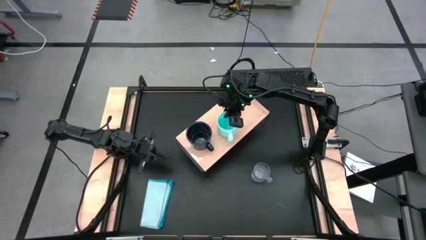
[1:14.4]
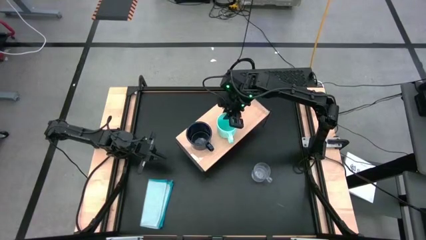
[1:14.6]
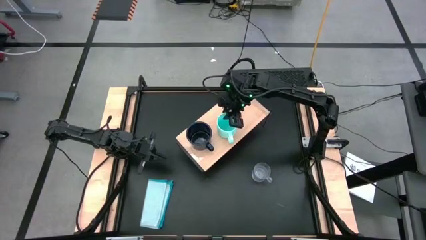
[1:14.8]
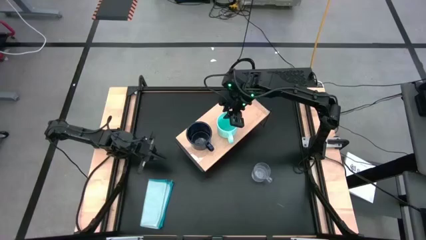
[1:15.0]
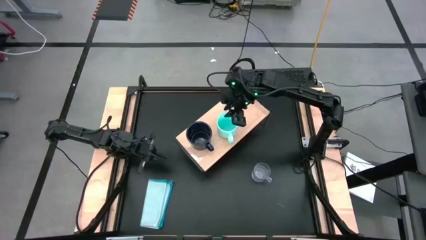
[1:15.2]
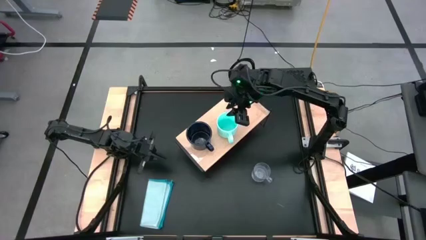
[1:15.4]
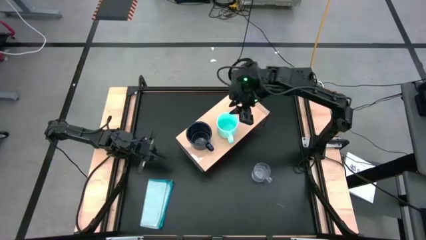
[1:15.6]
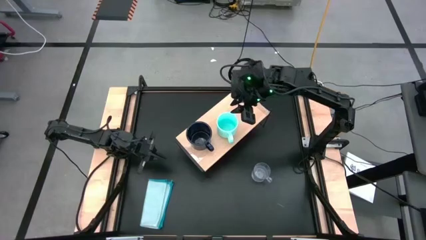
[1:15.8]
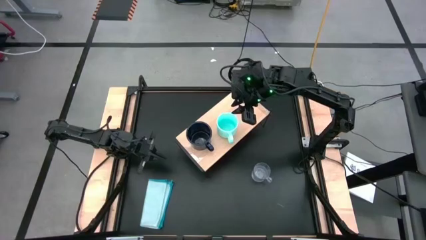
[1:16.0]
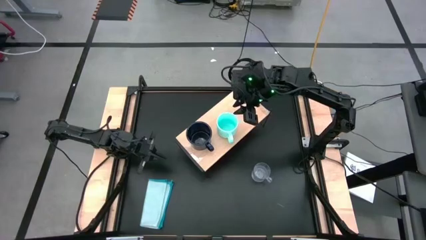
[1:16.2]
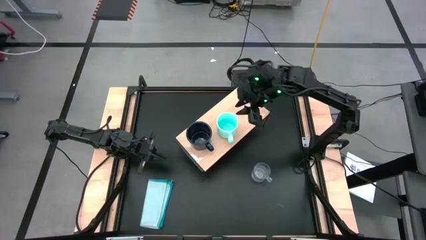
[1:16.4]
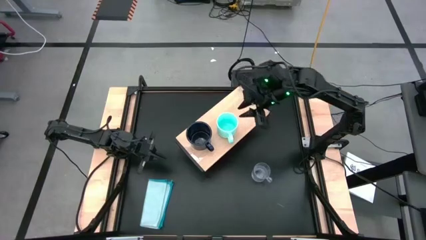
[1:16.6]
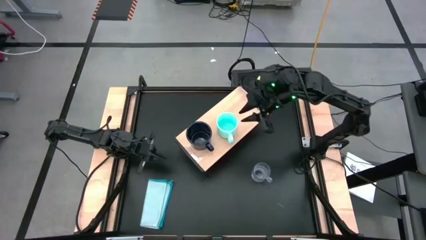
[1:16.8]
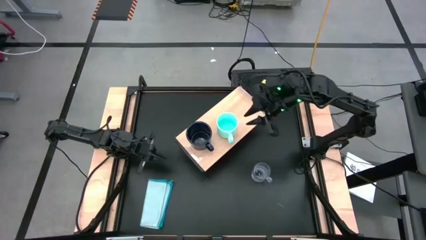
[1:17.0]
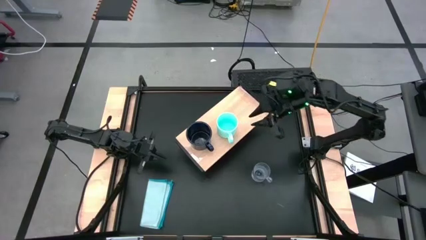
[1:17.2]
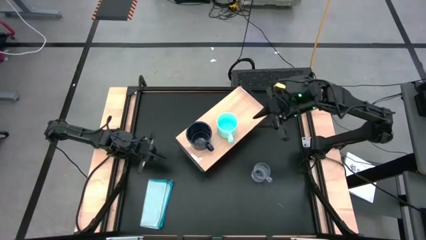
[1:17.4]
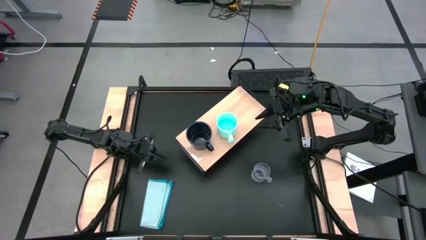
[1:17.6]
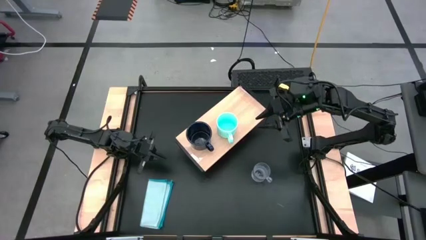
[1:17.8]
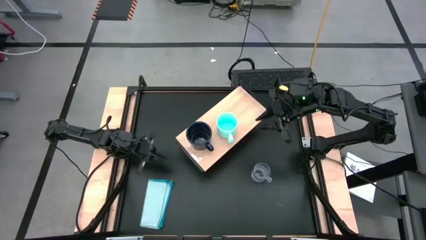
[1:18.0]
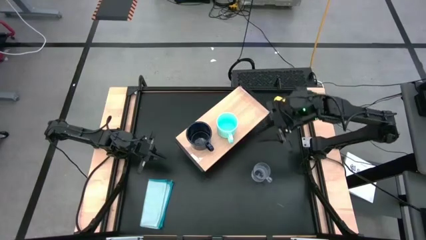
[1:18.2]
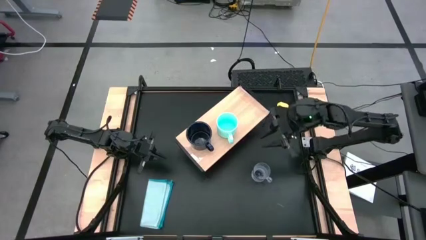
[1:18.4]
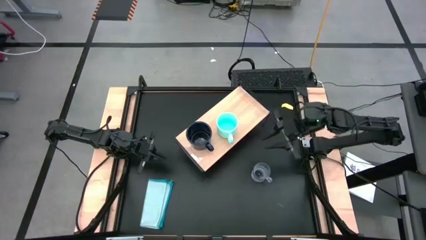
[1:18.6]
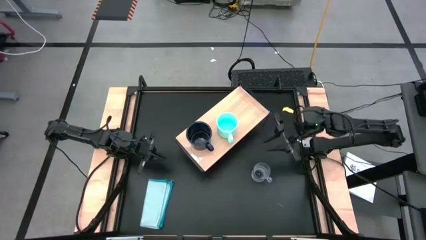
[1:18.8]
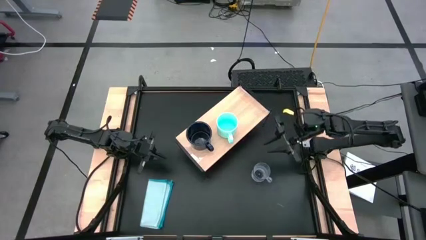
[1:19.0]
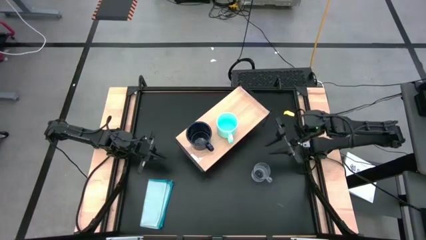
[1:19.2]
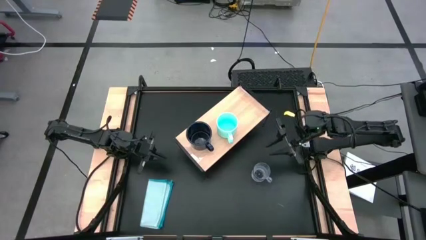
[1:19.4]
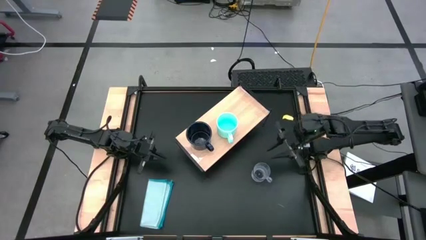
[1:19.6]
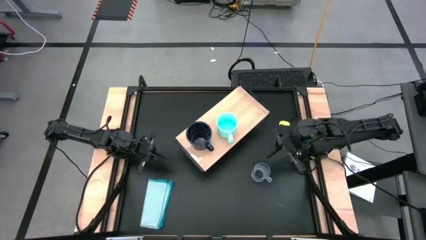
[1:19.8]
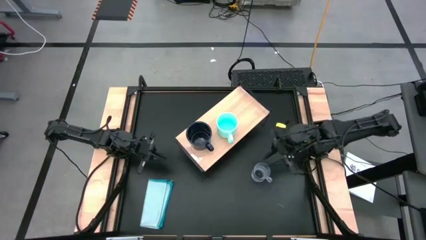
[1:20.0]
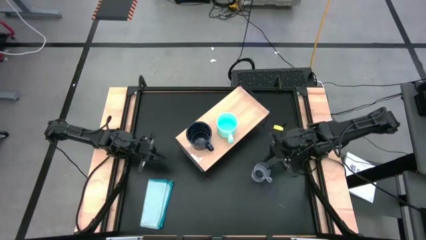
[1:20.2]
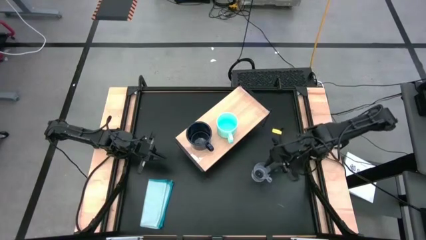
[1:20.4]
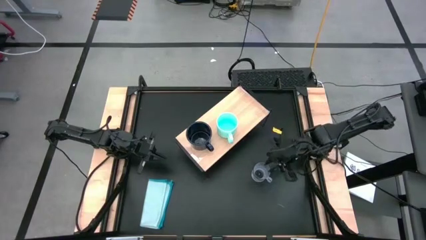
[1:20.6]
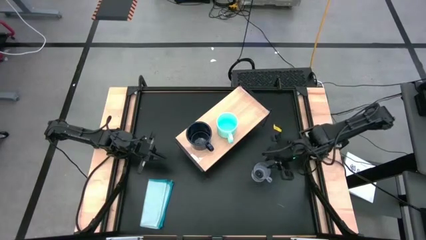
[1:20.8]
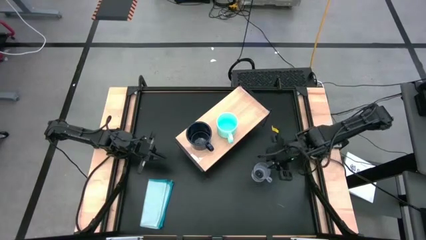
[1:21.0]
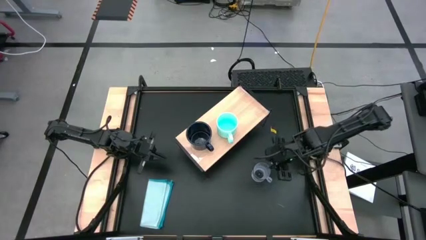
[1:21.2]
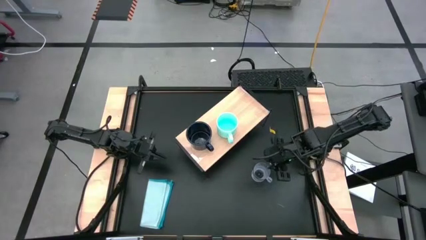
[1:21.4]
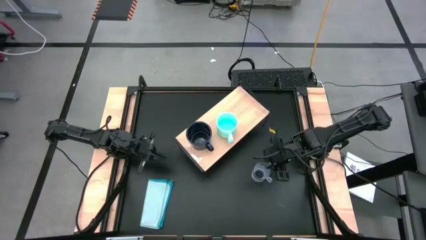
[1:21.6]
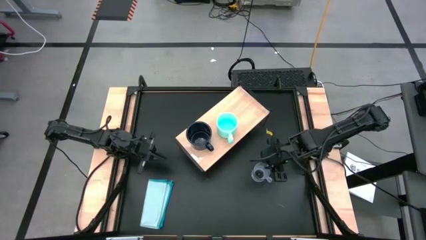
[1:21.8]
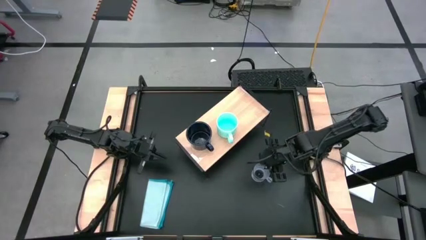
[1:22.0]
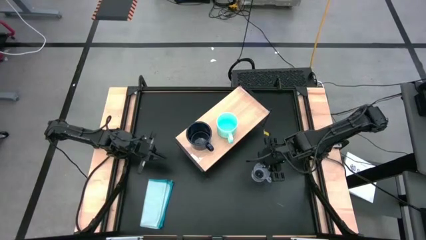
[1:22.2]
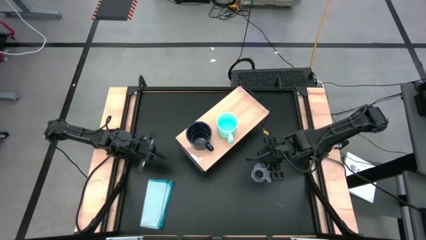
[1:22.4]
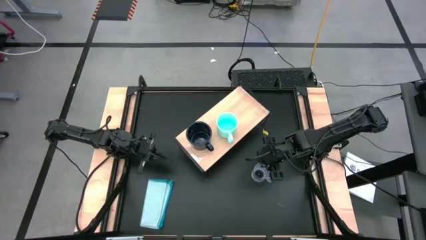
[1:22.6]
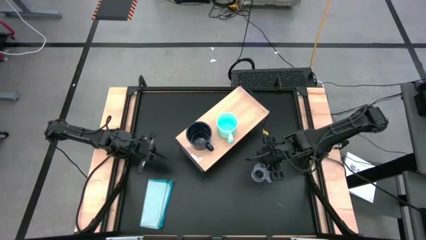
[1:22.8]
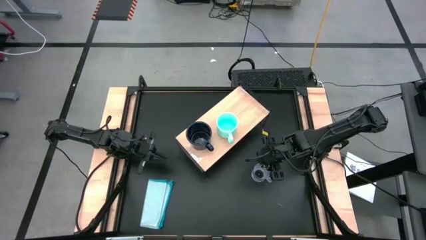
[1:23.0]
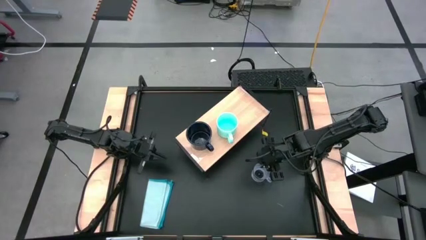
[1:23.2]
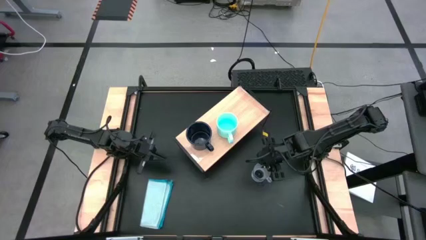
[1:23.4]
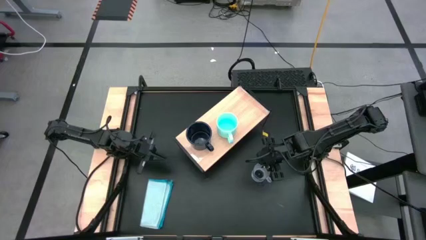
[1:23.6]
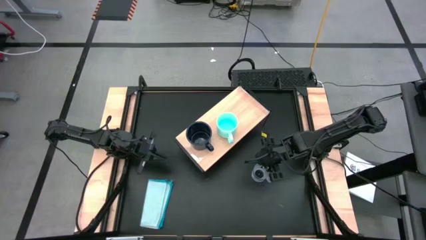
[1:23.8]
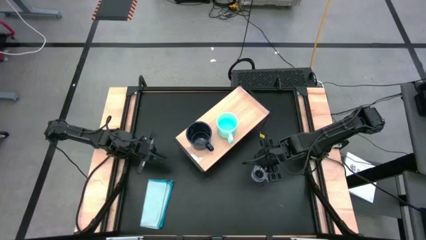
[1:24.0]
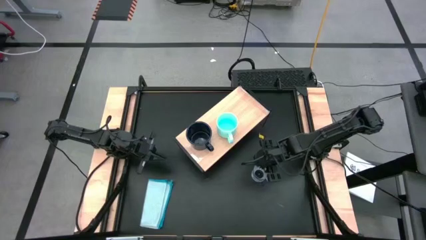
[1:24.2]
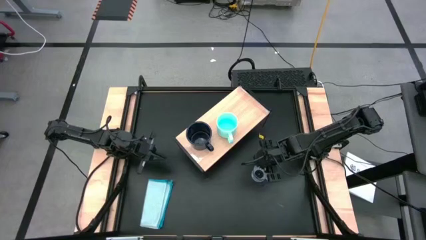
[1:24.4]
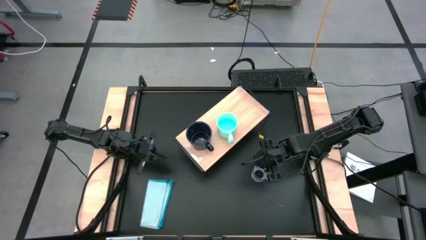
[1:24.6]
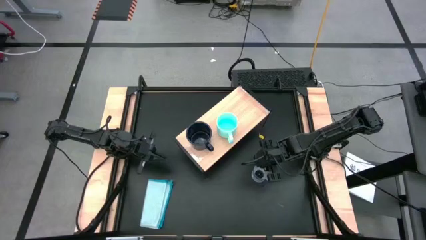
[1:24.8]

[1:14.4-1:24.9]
Task: Stack small to large cups/mugs on shelf
Put the transparent cup on the shelf
